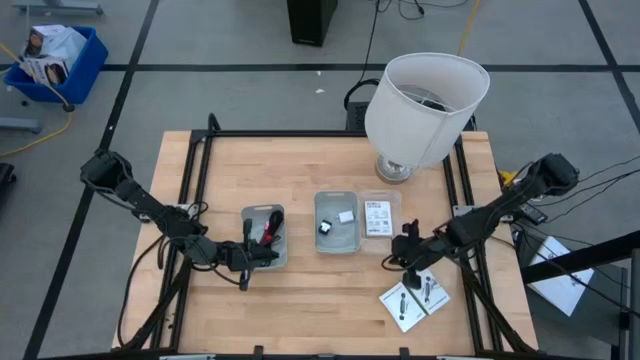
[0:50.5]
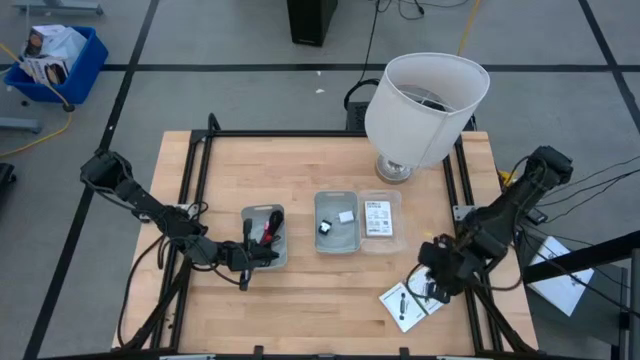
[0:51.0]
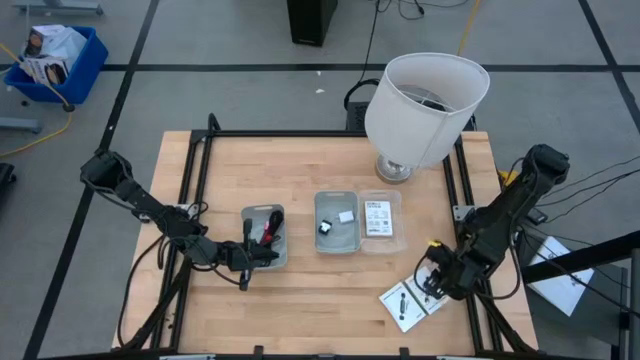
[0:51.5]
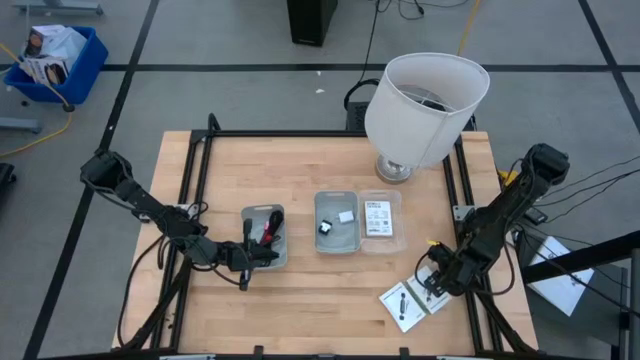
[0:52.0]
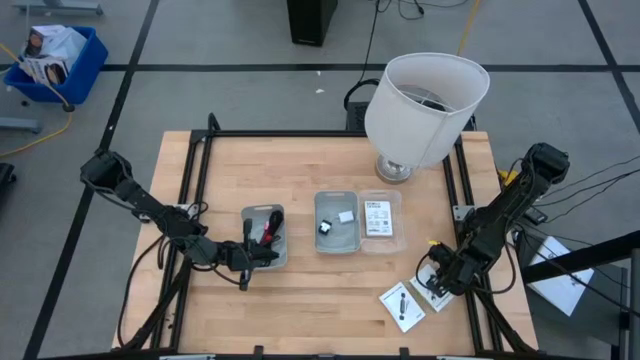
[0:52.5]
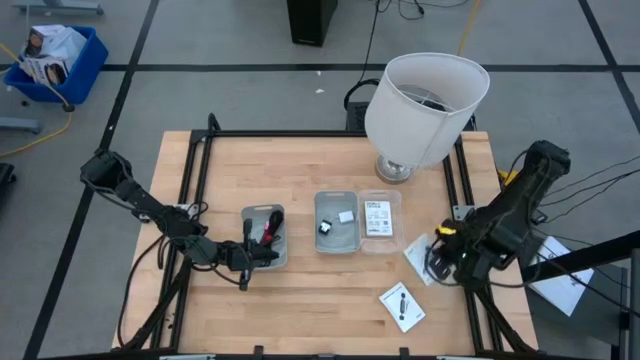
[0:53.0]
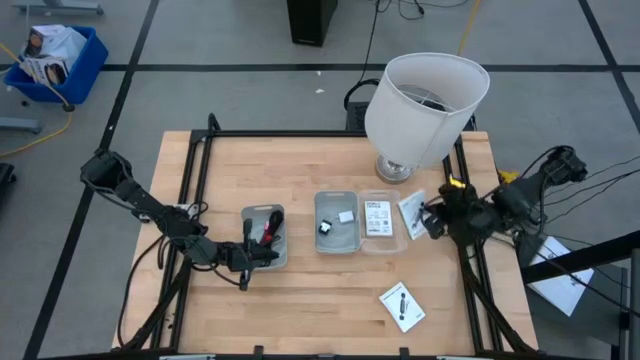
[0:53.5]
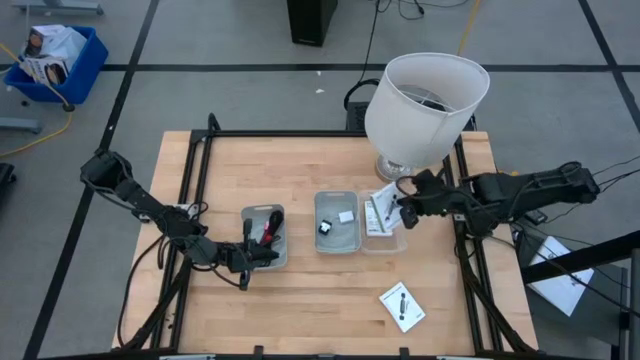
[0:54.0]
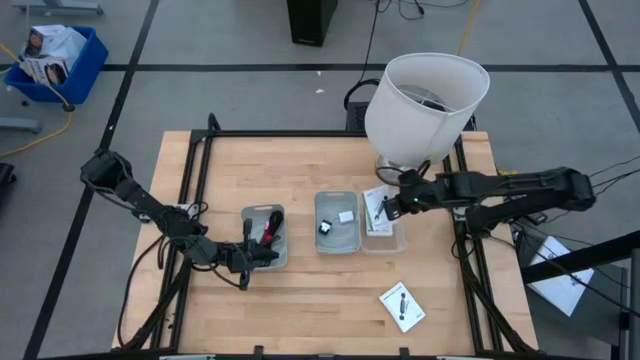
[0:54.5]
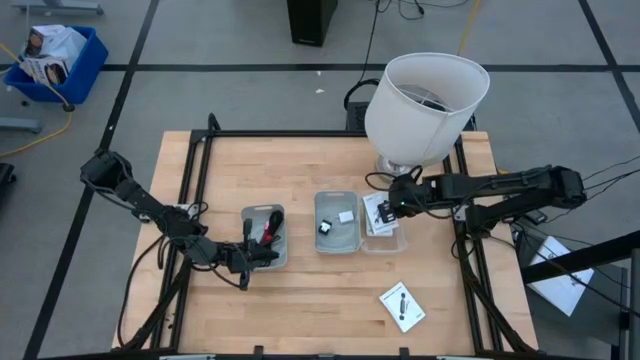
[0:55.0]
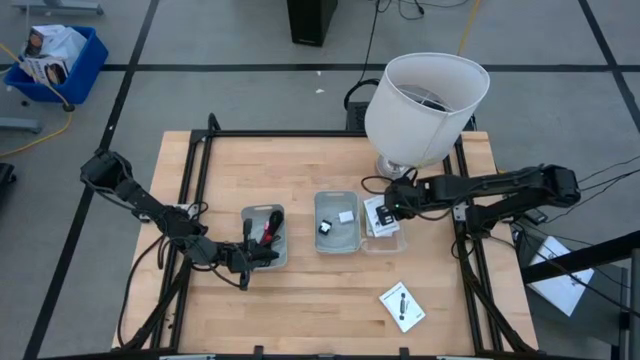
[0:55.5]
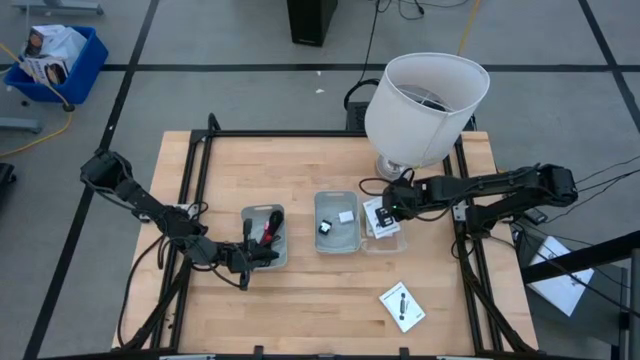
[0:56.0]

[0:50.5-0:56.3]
Task: Pick and place items into bin
Put the right white card reader box into the transparent bin

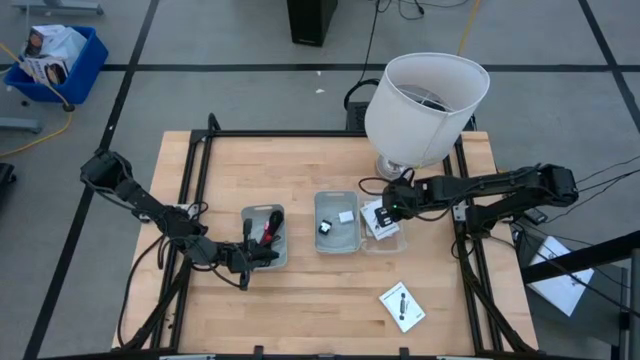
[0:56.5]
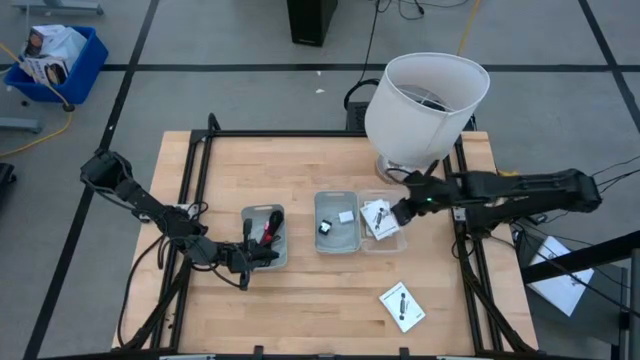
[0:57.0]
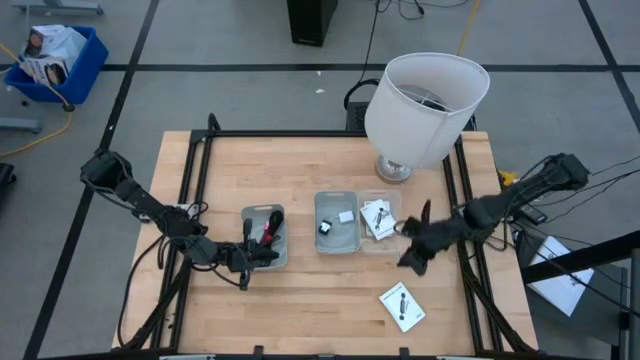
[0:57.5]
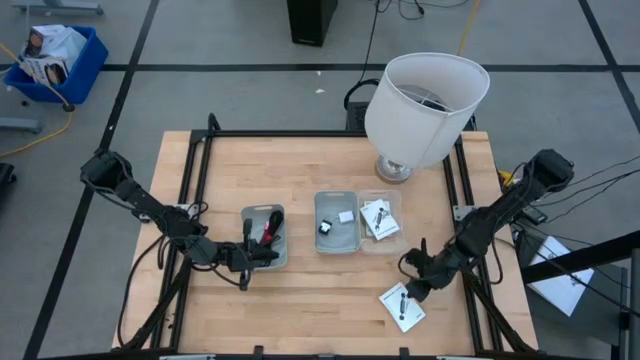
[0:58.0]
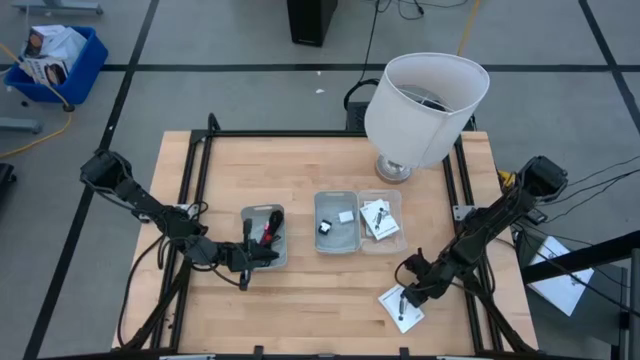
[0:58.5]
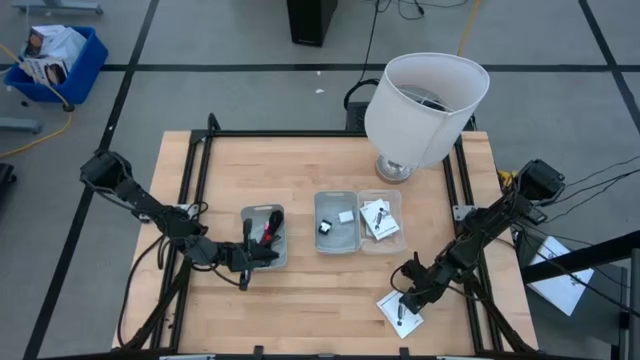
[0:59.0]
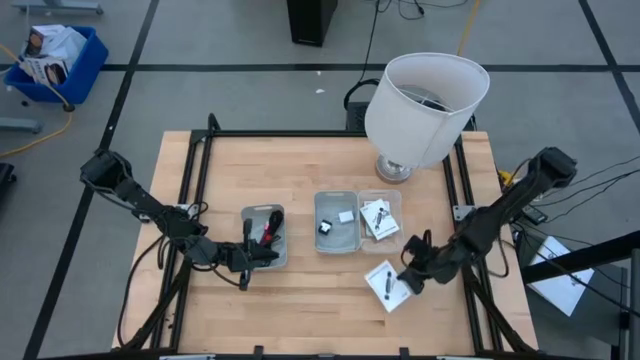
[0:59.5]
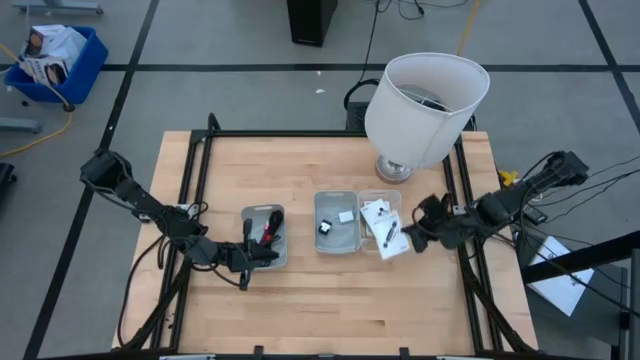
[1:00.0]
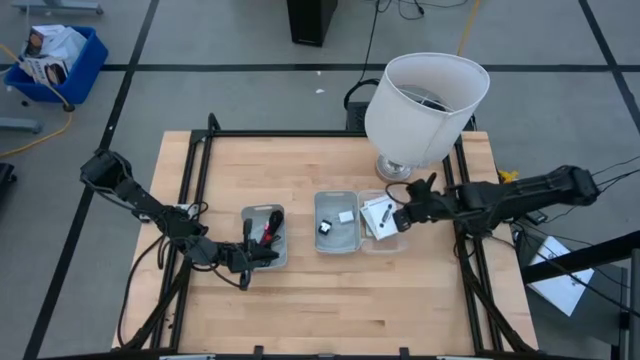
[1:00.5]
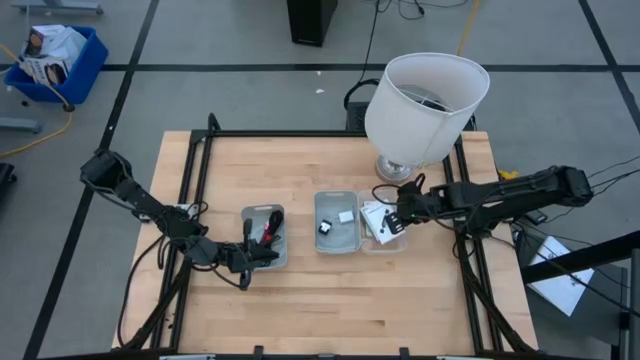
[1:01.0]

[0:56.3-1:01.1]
Put the white card reader box into the transparent bin

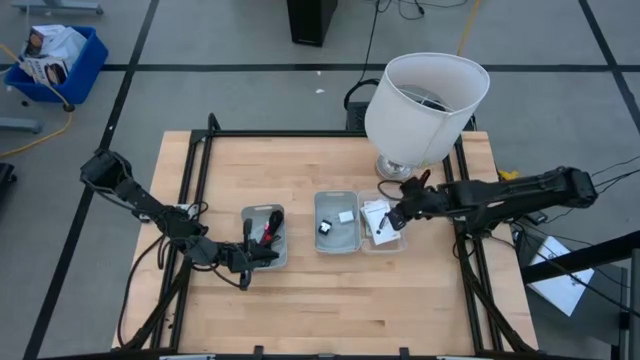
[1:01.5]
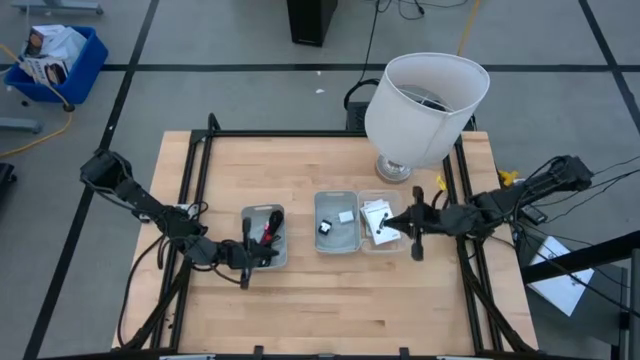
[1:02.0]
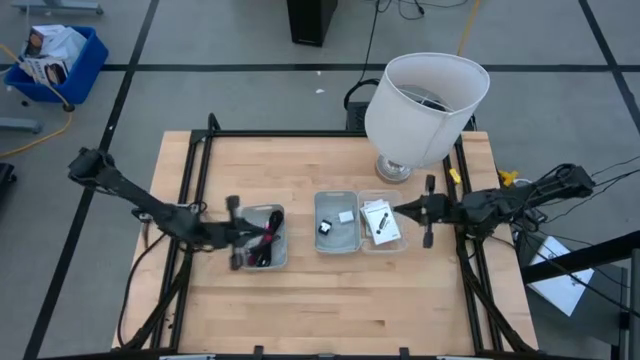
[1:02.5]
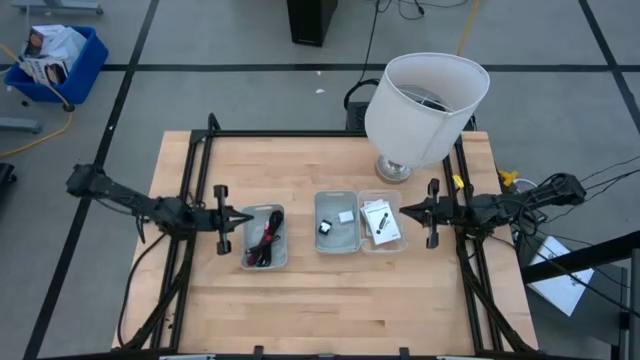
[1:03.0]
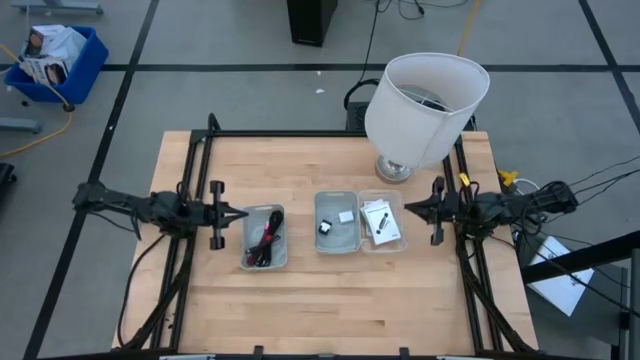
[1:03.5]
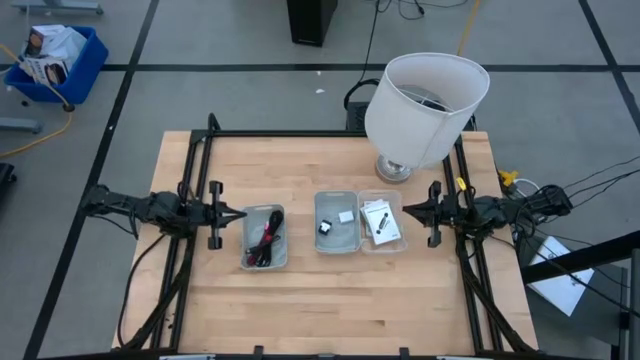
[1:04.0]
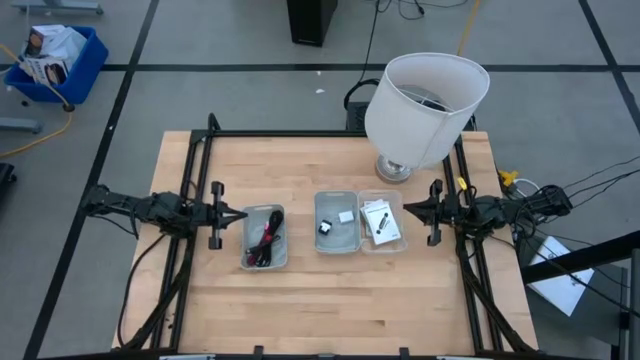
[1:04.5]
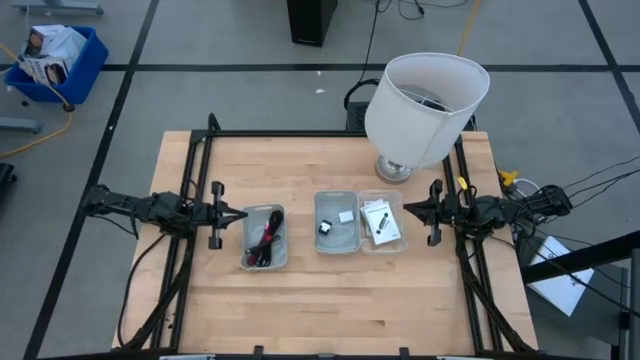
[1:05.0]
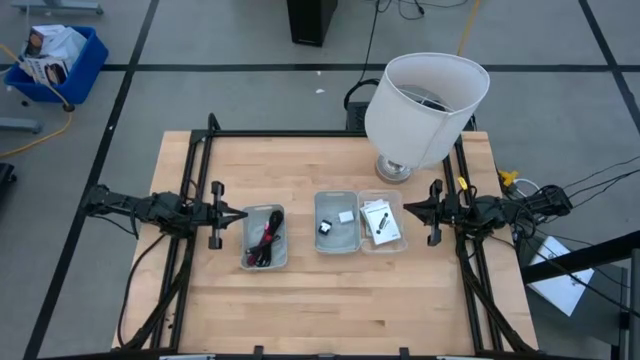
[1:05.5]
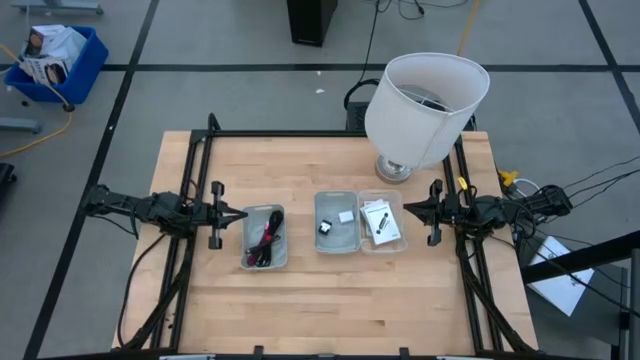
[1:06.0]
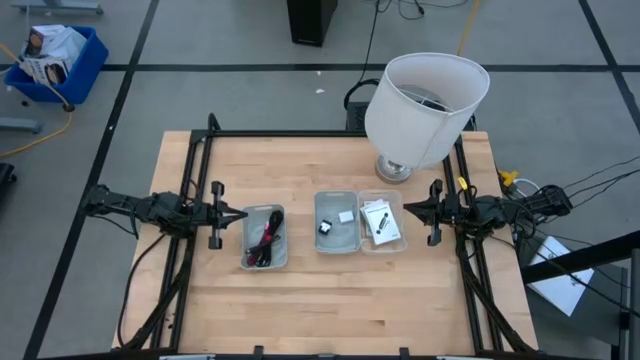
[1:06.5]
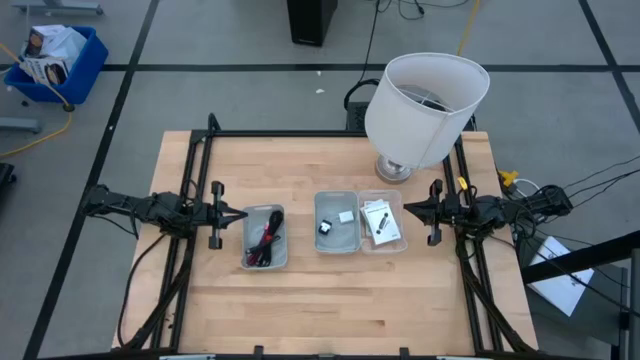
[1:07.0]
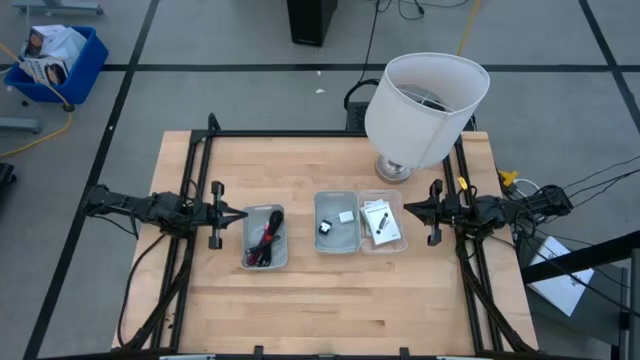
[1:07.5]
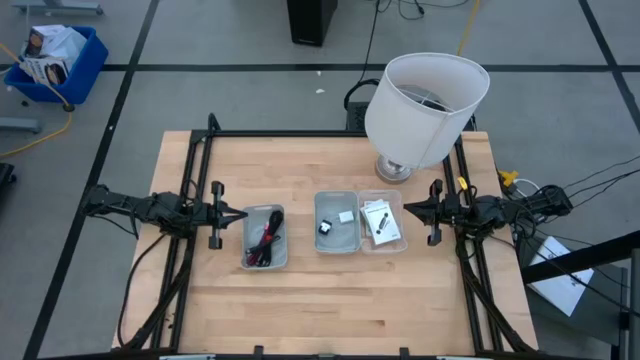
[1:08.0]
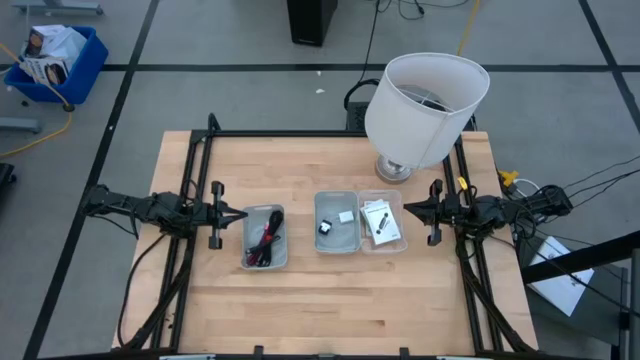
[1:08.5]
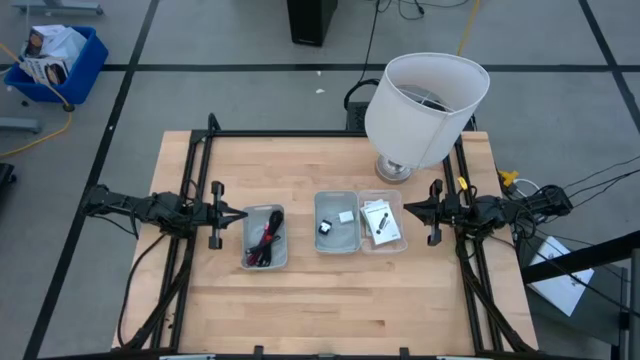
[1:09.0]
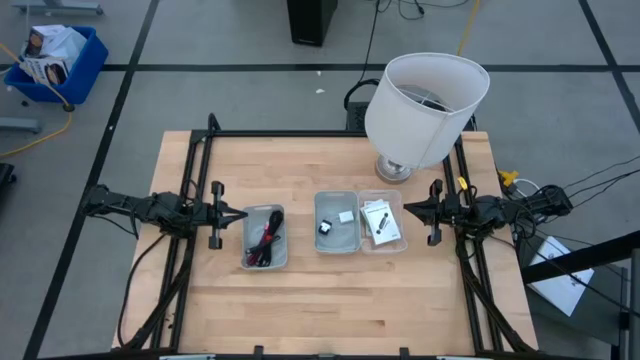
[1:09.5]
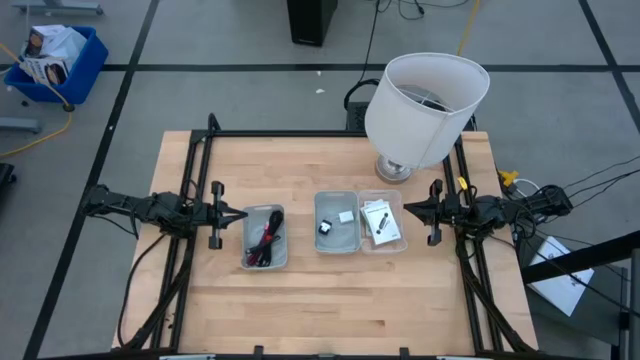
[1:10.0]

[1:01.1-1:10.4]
Return to Home Position

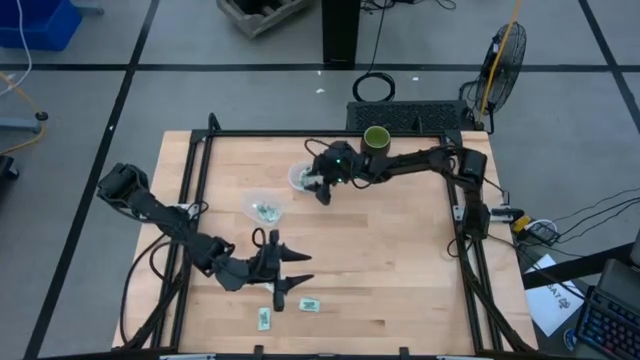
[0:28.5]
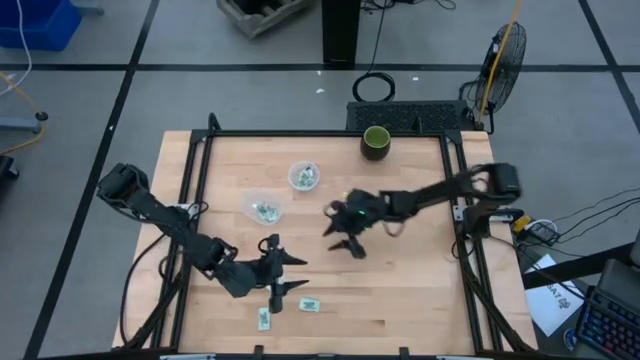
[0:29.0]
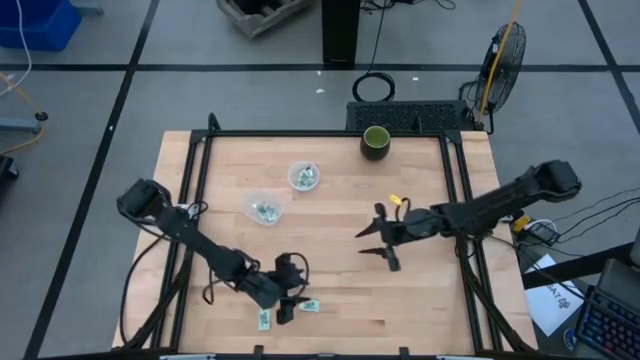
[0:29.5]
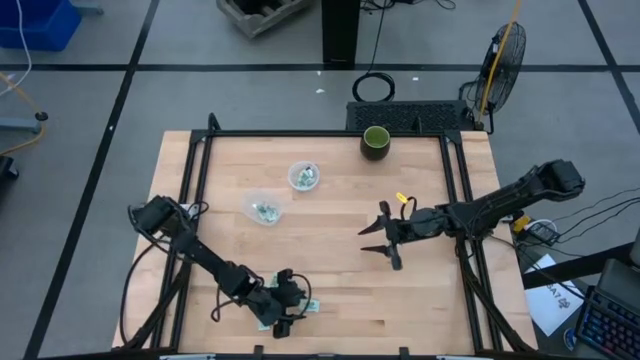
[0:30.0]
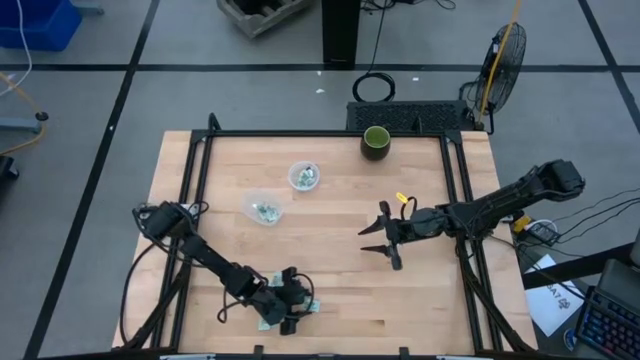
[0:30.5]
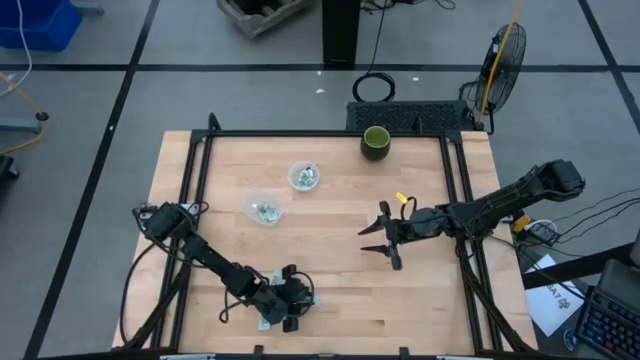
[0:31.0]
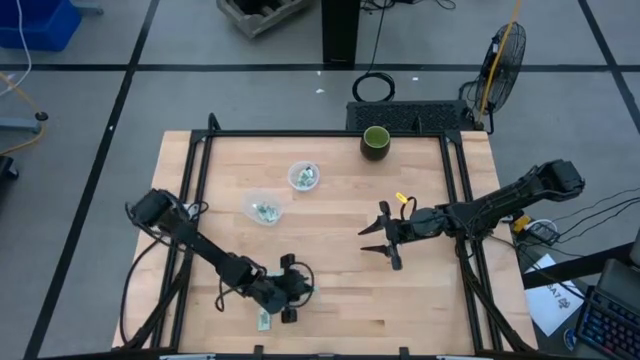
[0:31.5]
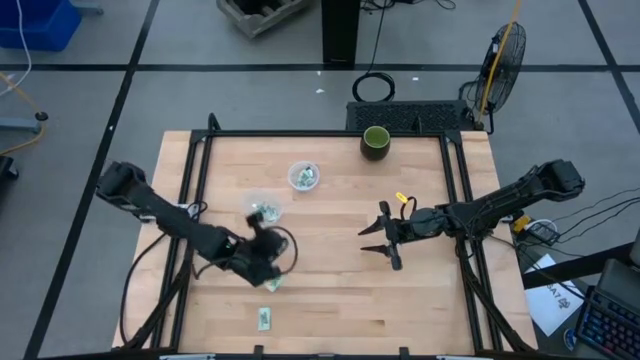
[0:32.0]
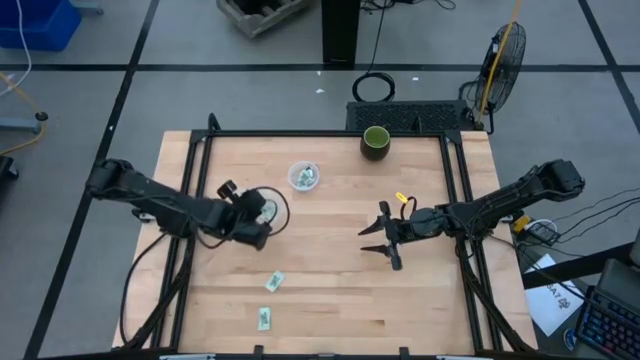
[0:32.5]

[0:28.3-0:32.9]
Task: Pick and place Stevia / Truvia into bins
Put the stevia packet into the bottom container
